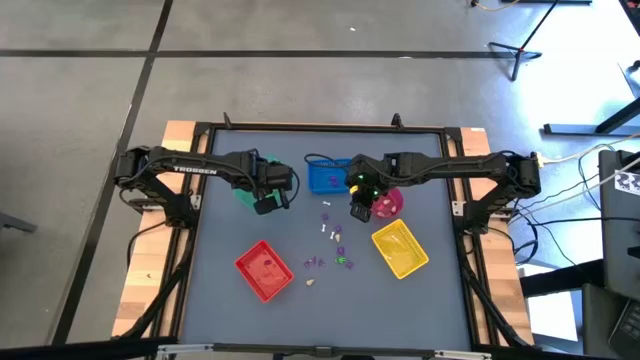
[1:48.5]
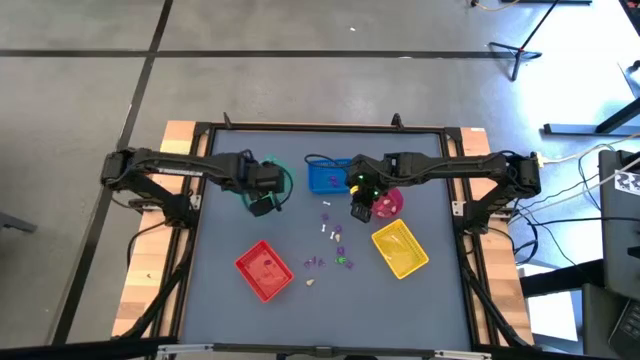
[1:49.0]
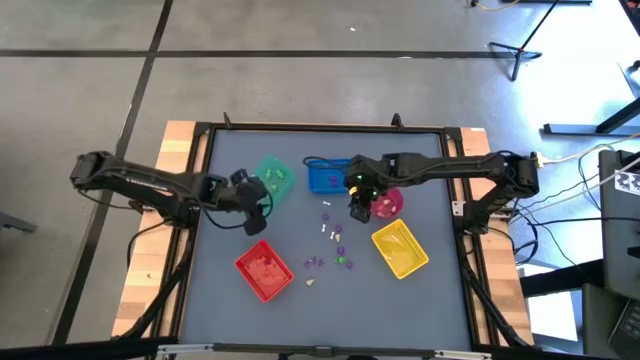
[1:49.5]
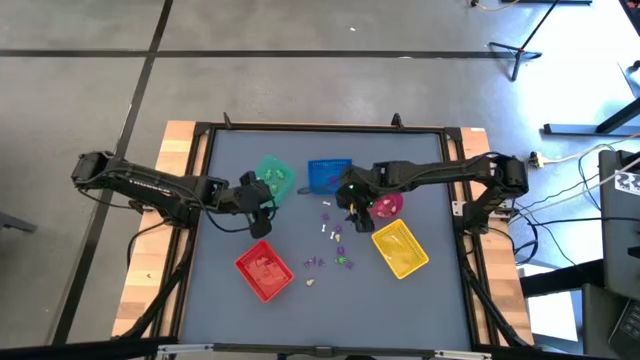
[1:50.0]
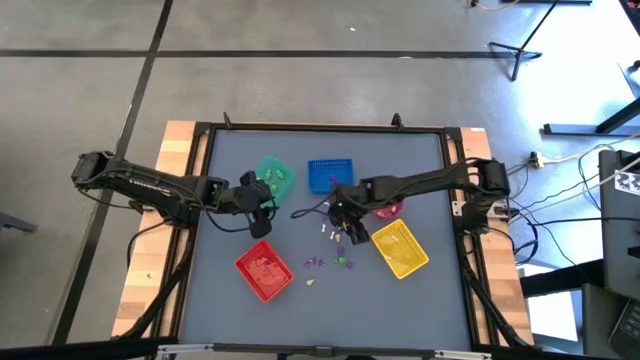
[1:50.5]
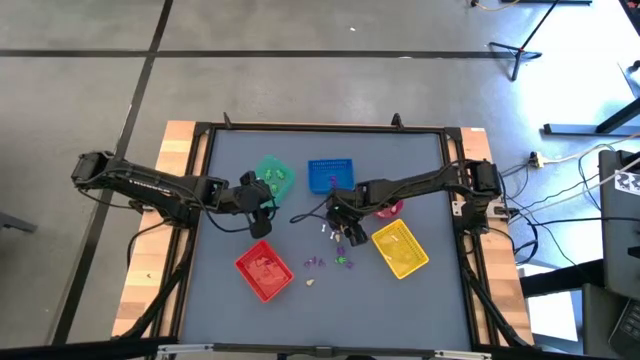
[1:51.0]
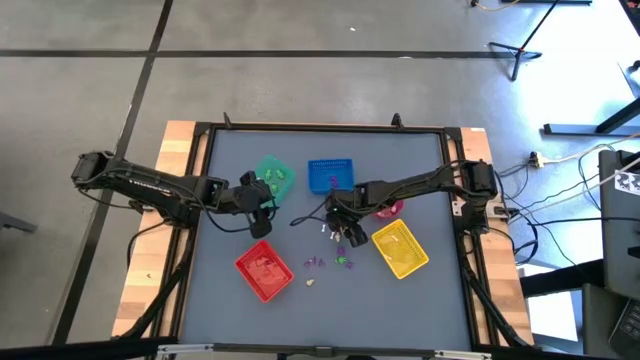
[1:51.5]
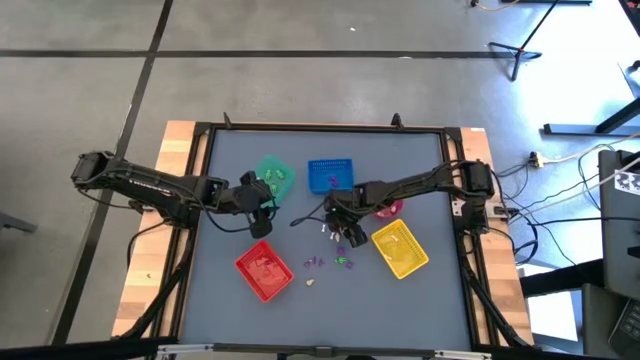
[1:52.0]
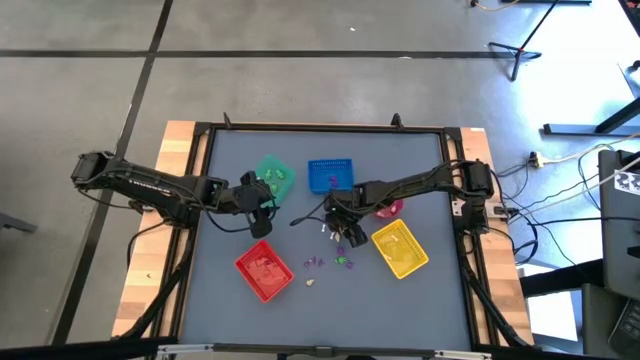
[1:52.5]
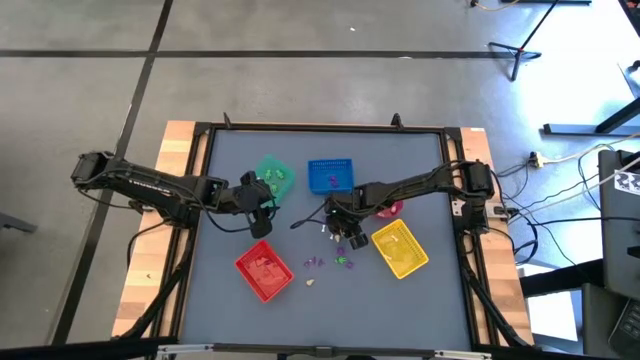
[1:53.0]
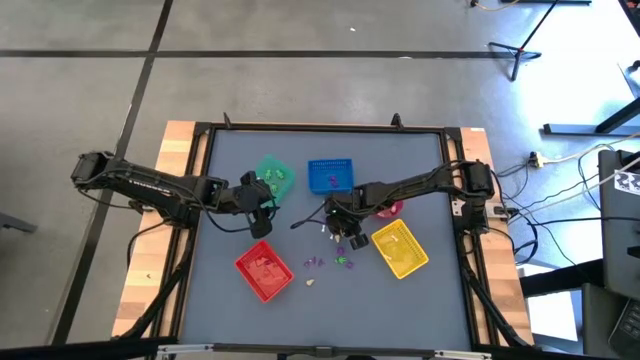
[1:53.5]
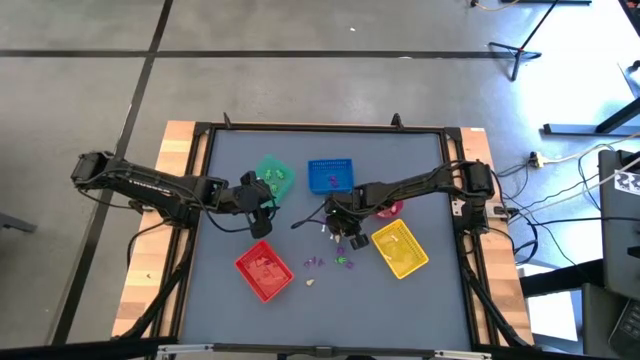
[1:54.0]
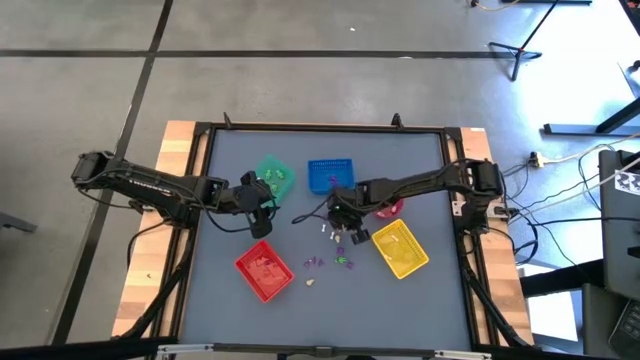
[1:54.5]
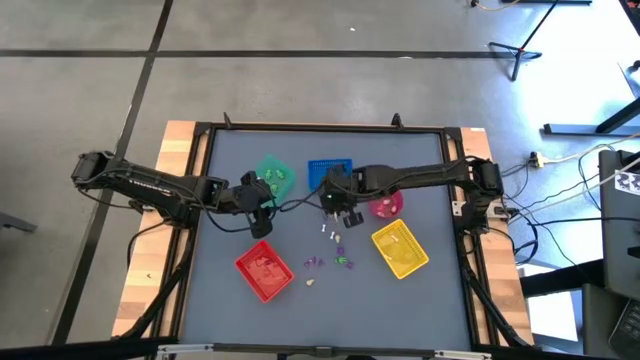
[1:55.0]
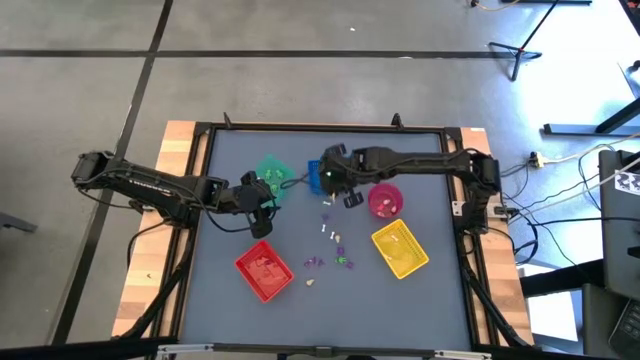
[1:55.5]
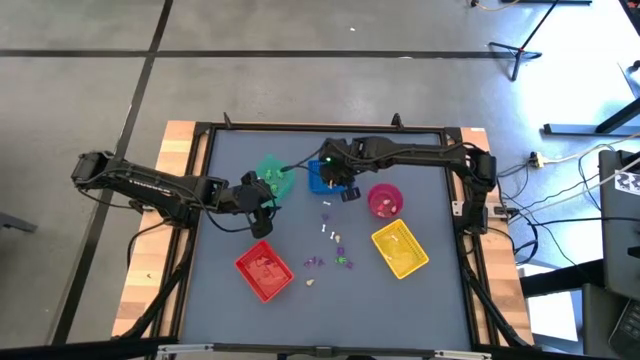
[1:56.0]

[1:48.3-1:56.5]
Task: Sort Halloween decoration
Put the purple spider toy into the blue bin

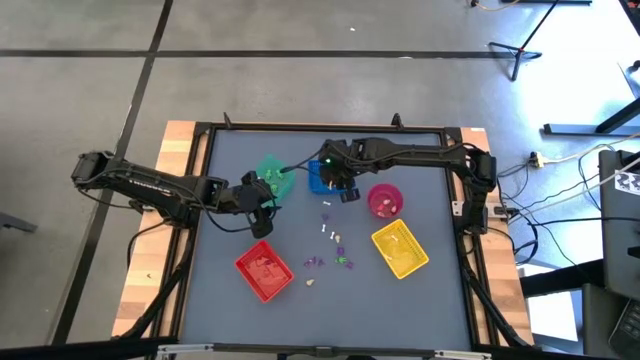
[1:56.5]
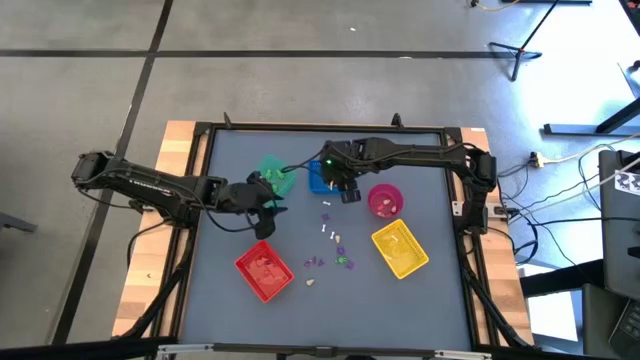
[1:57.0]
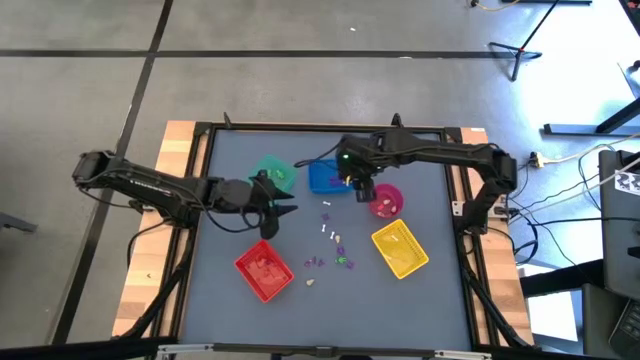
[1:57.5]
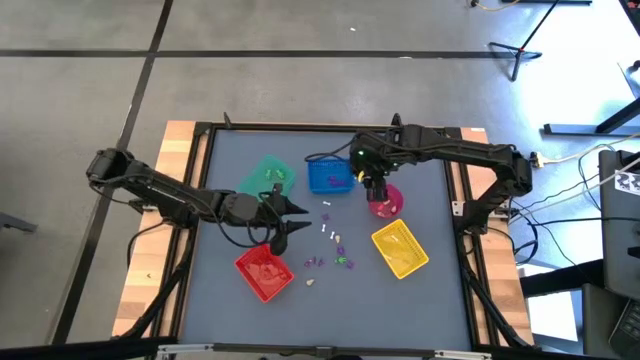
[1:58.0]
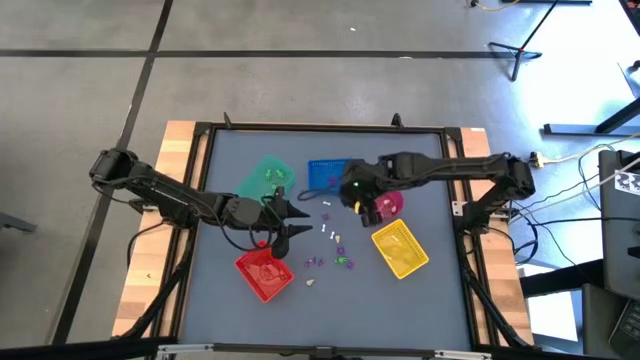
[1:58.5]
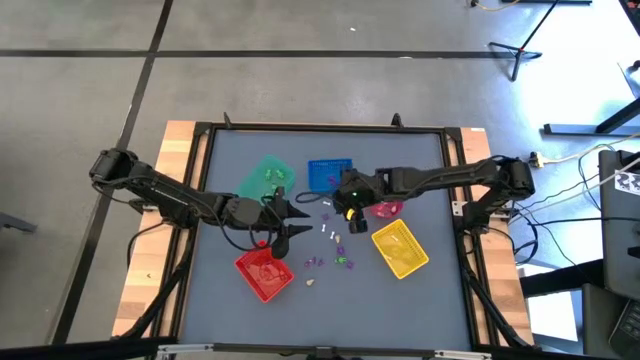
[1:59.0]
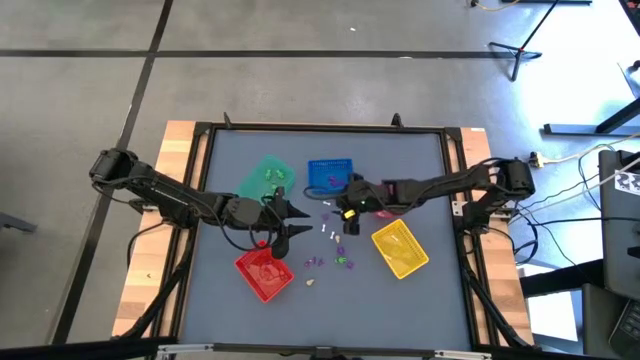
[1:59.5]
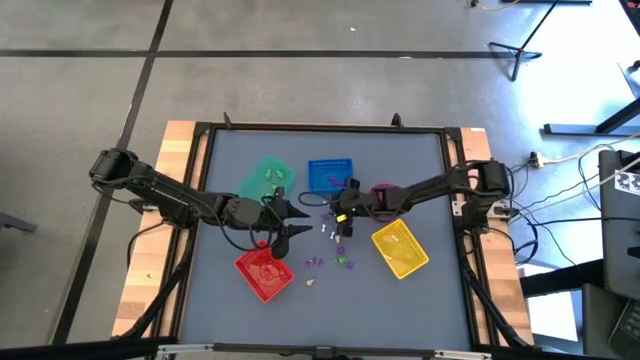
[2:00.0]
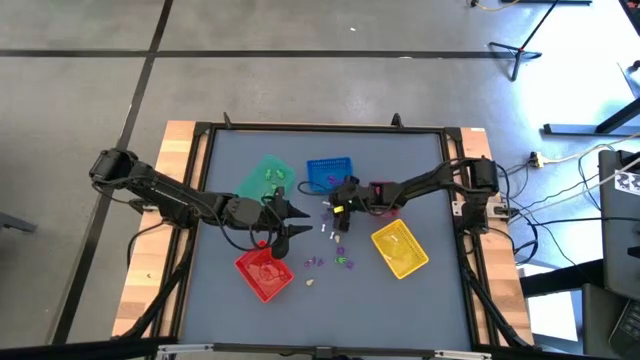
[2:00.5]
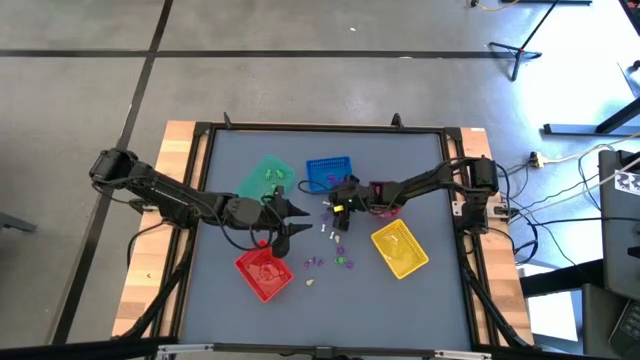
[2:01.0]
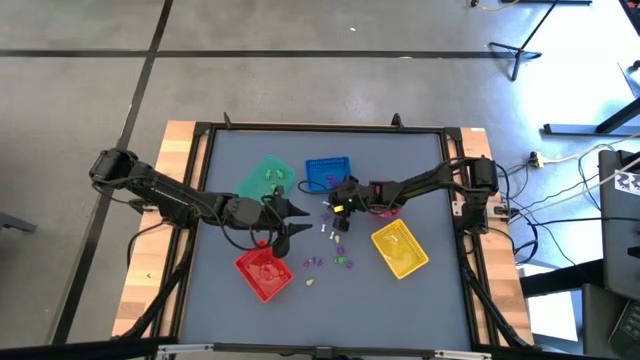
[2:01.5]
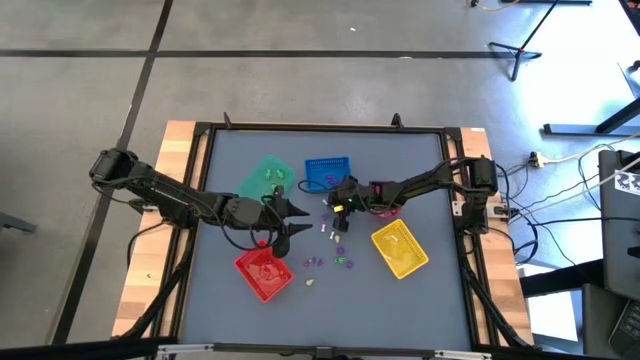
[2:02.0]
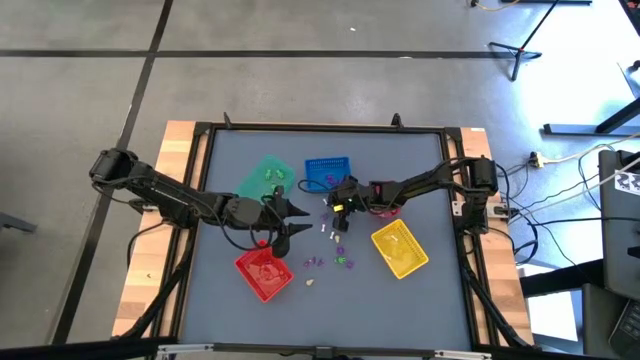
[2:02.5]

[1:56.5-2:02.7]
Put the white bone toy into the yellow bin

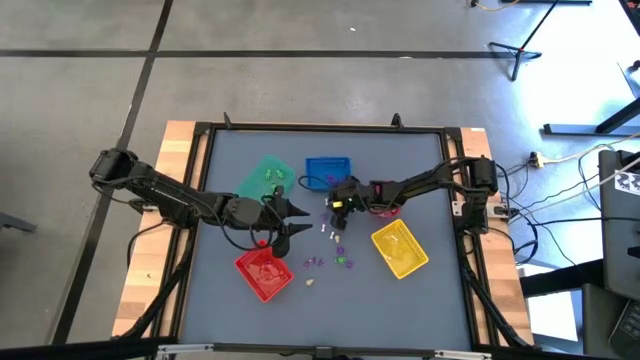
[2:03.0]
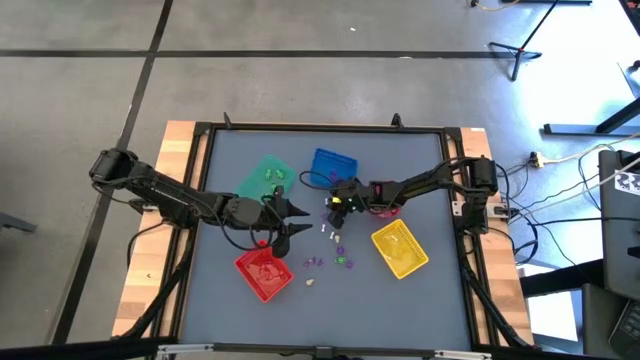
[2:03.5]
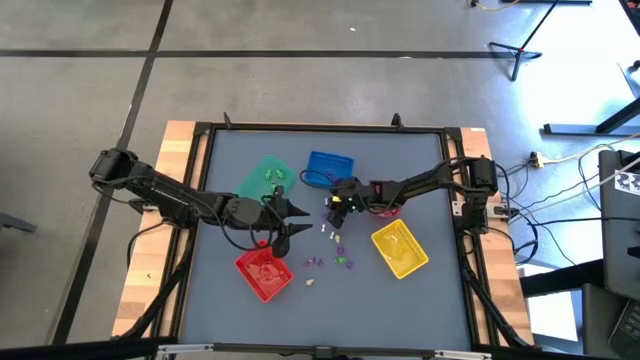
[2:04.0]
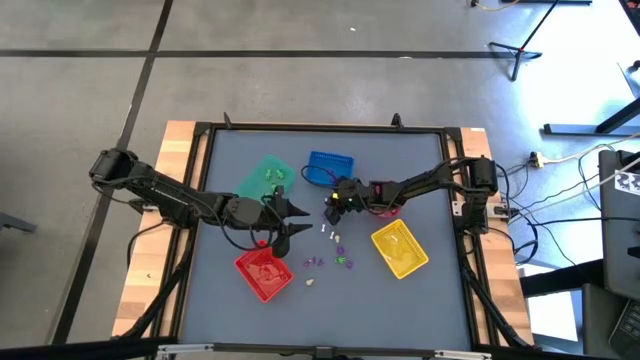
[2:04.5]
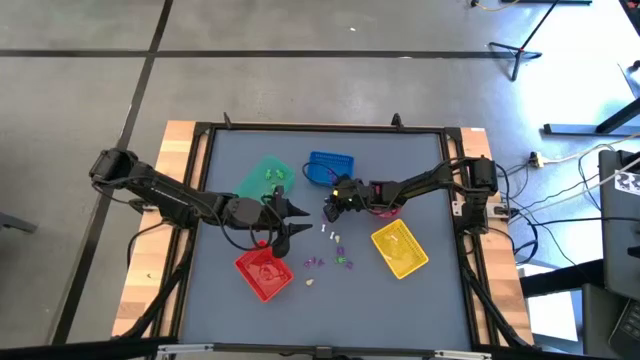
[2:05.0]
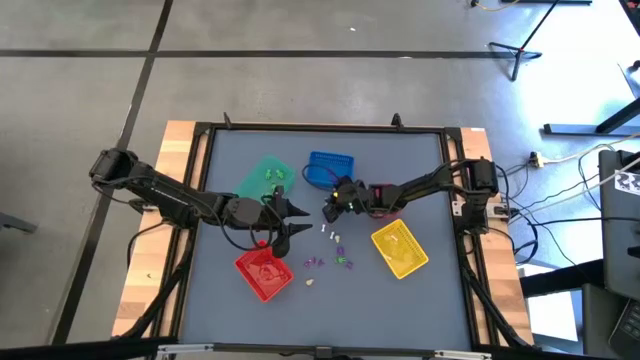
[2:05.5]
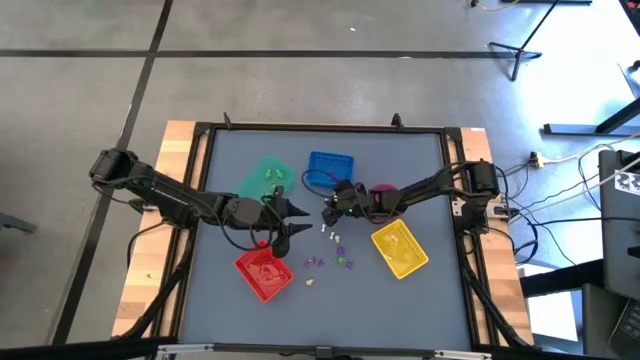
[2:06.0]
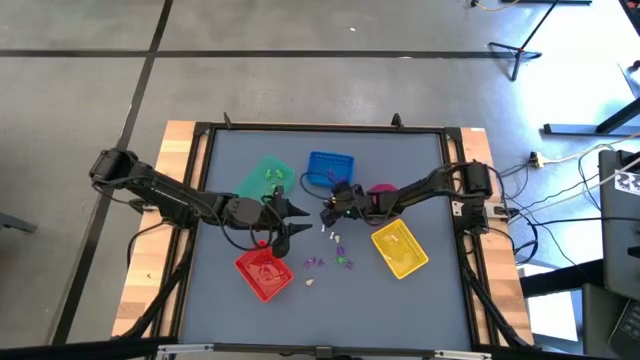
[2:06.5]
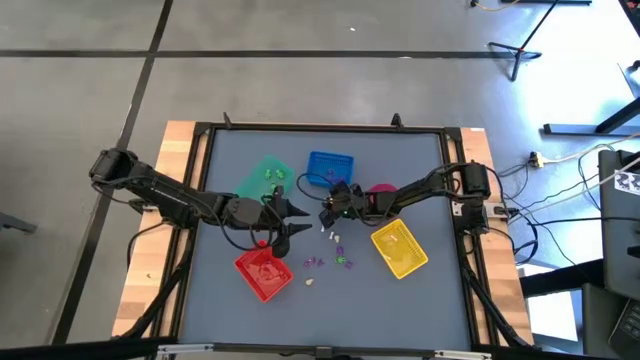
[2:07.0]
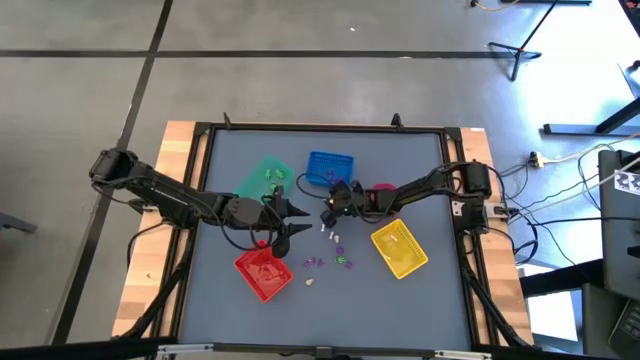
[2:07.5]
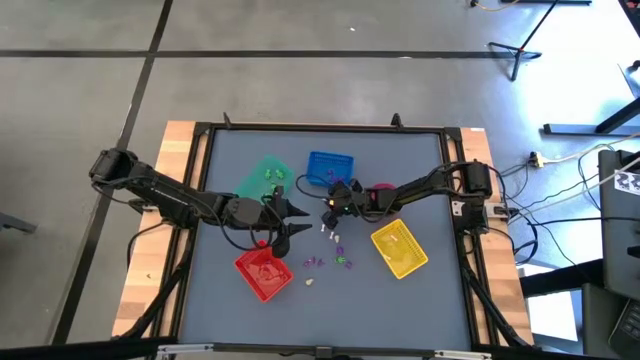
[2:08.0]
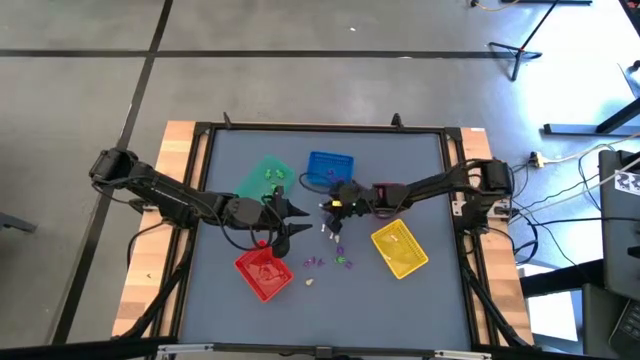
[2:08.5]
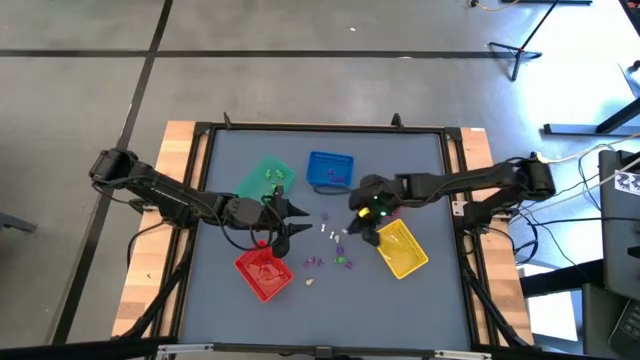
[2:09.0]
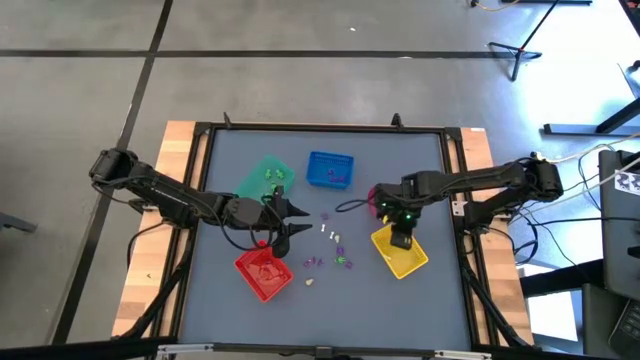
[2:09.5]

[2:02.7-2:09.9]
Put the white bone toy into the yellow bin

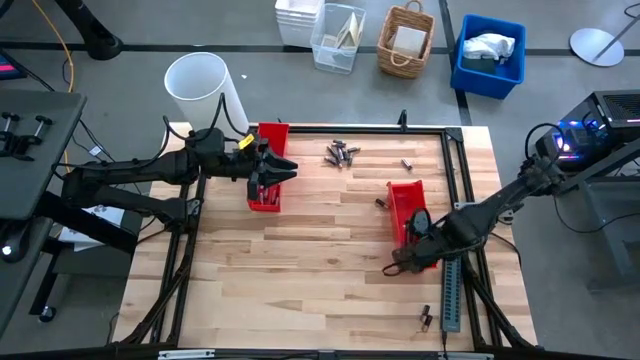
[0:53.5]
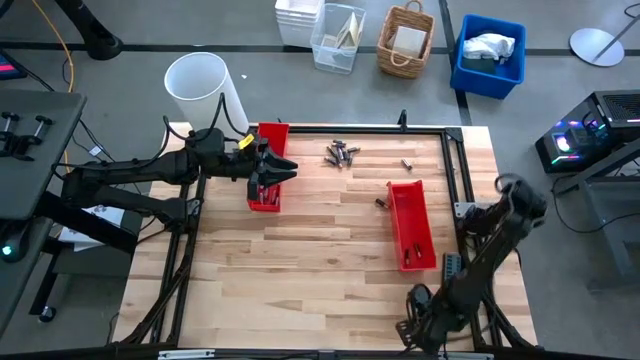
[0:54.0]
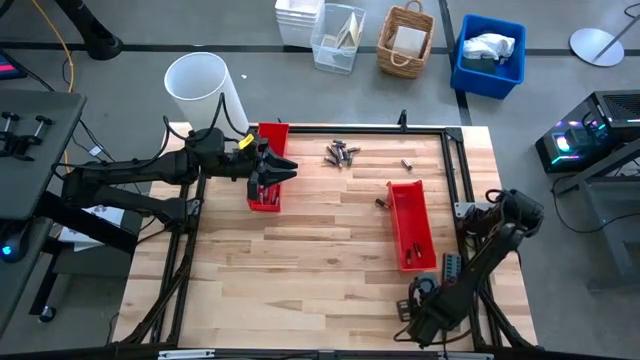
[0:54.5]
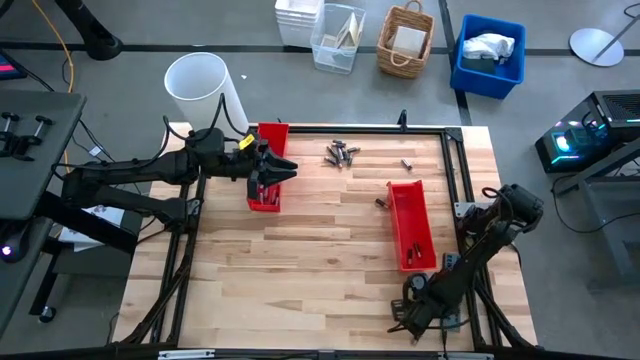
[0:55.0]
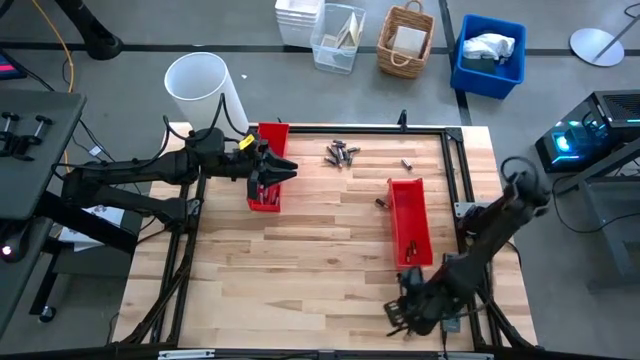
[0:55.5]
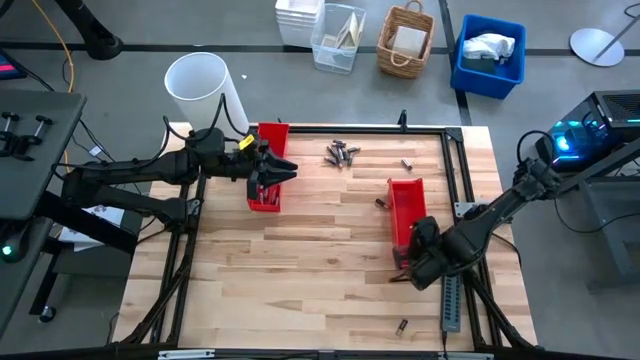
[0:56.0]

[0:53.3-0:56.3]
Task: Sort batteries
Put the black battery into the bottom red bin
